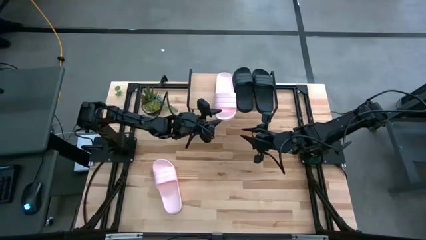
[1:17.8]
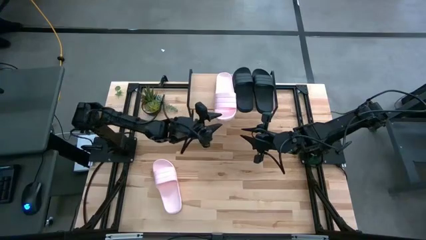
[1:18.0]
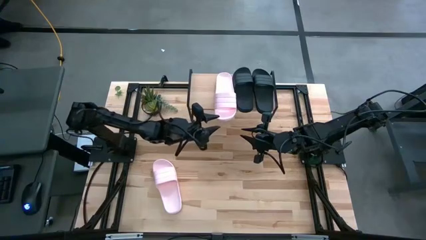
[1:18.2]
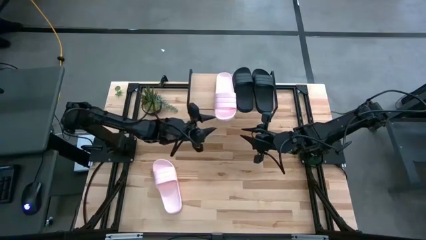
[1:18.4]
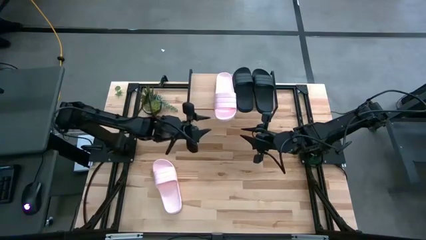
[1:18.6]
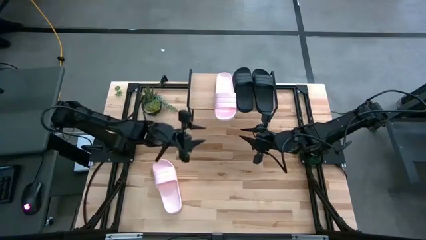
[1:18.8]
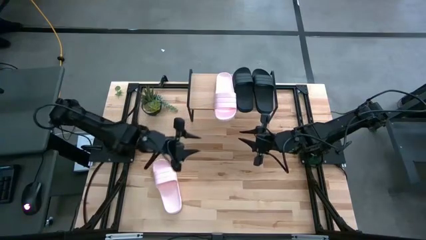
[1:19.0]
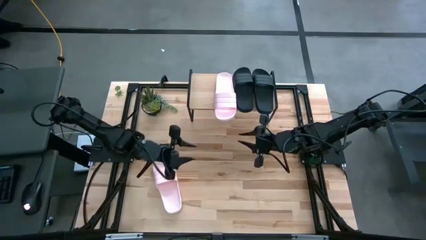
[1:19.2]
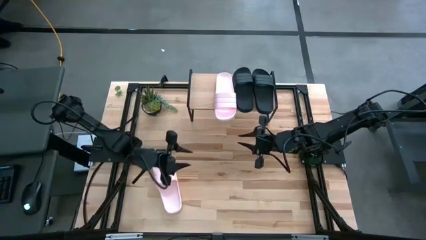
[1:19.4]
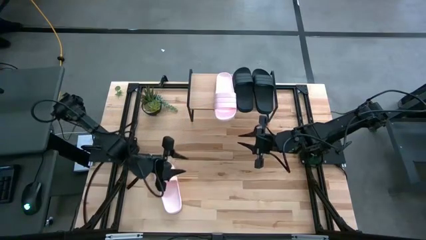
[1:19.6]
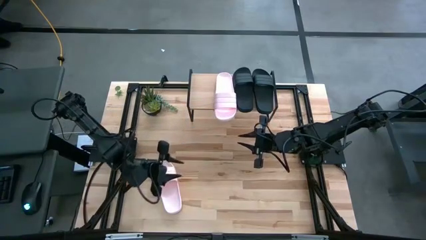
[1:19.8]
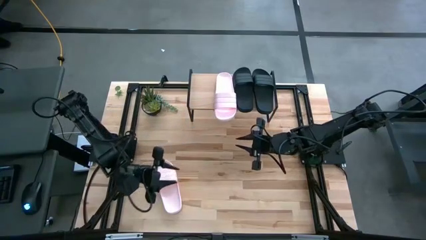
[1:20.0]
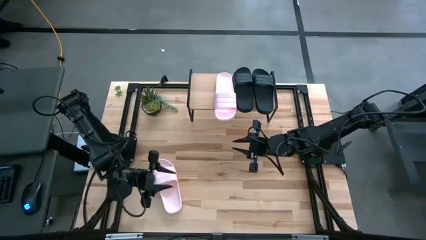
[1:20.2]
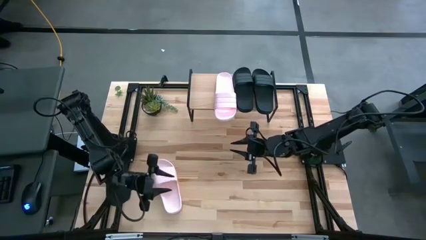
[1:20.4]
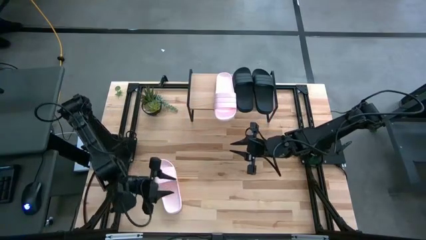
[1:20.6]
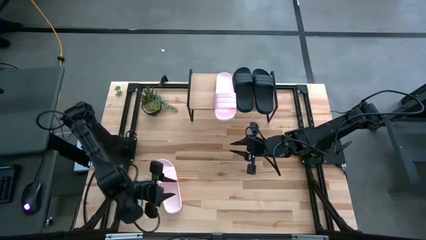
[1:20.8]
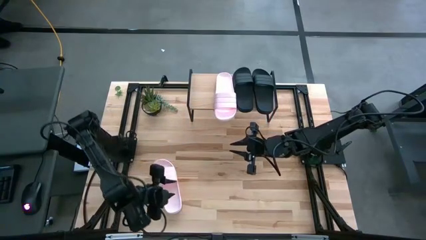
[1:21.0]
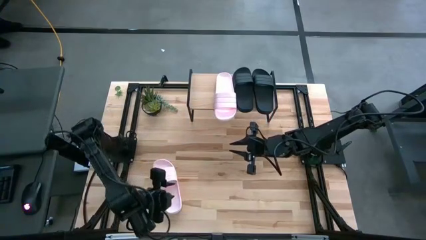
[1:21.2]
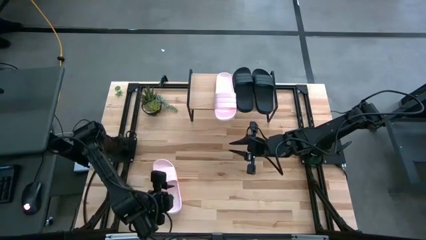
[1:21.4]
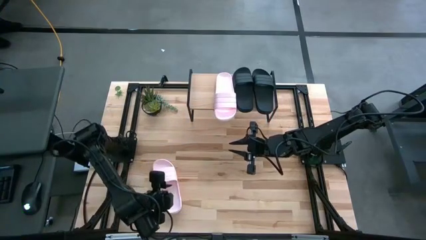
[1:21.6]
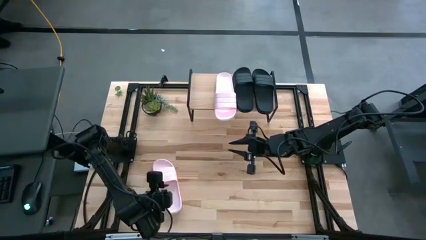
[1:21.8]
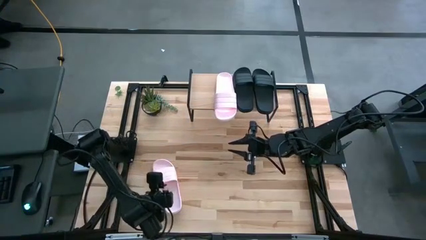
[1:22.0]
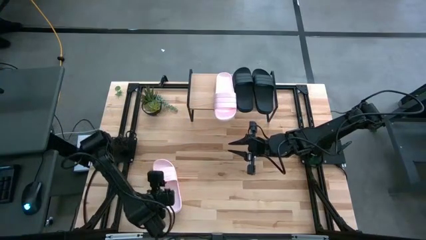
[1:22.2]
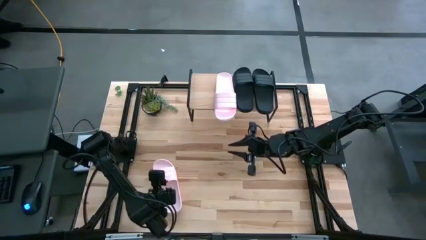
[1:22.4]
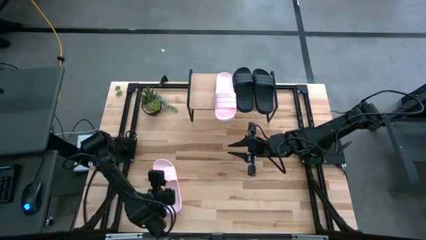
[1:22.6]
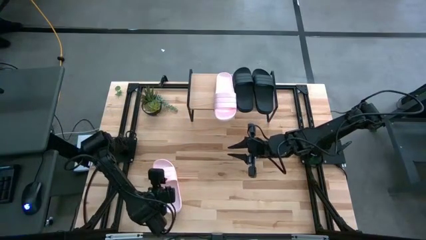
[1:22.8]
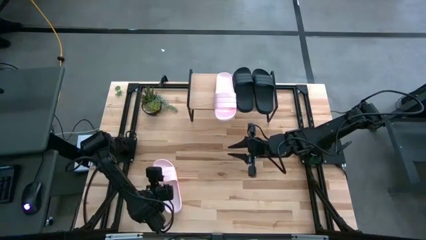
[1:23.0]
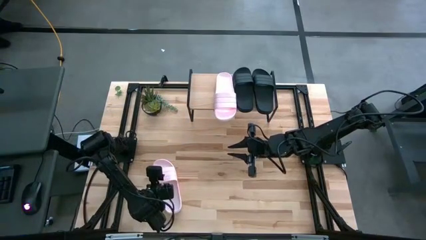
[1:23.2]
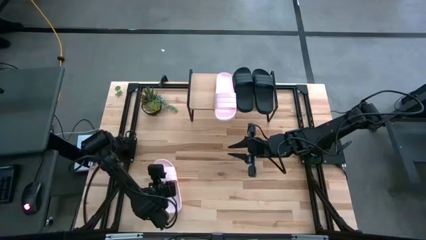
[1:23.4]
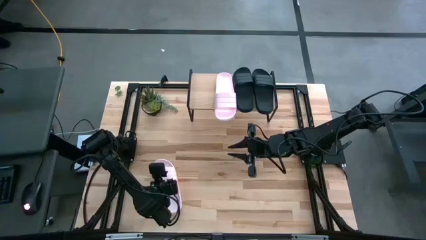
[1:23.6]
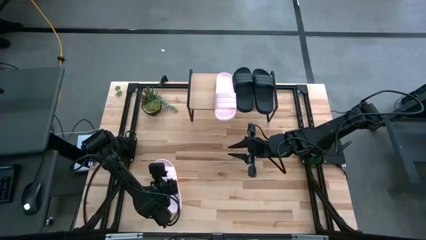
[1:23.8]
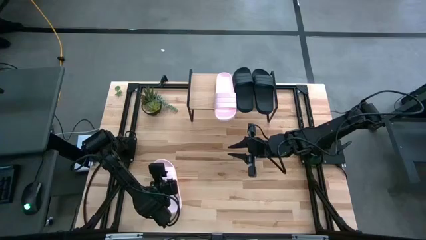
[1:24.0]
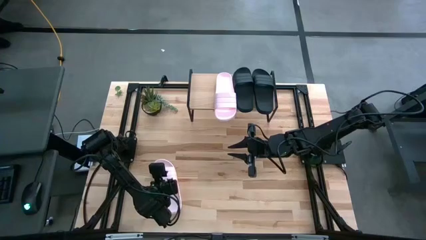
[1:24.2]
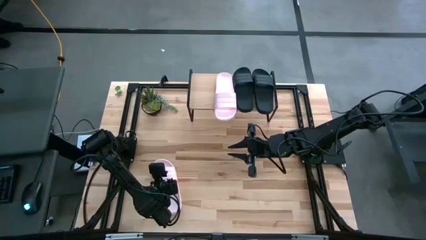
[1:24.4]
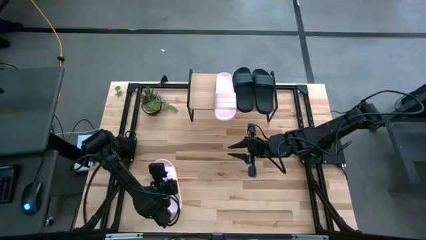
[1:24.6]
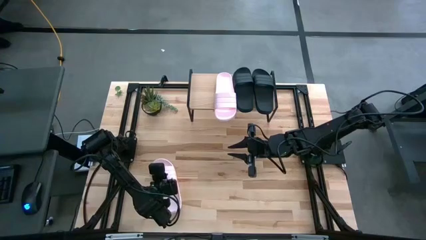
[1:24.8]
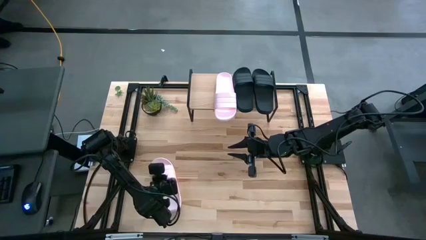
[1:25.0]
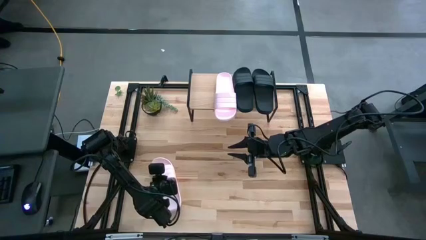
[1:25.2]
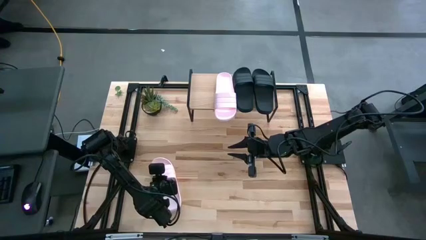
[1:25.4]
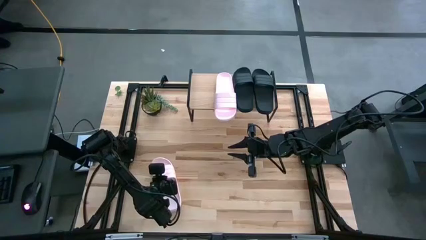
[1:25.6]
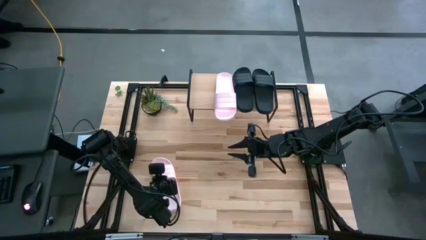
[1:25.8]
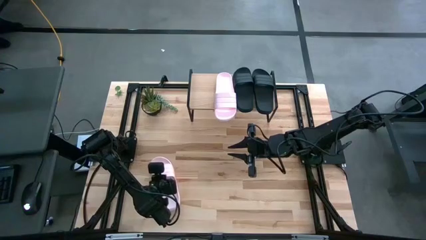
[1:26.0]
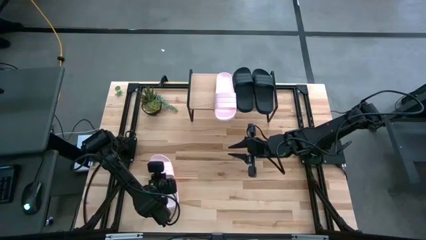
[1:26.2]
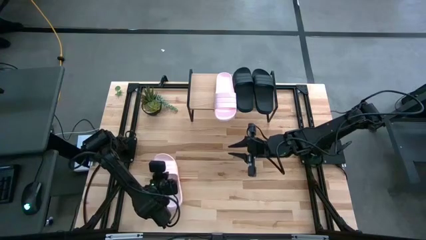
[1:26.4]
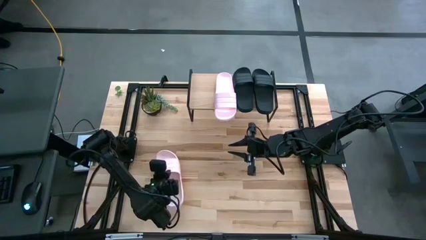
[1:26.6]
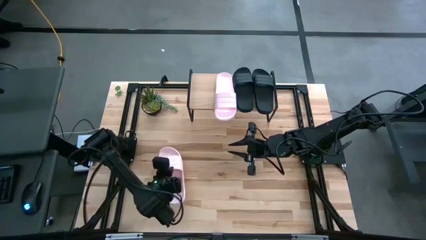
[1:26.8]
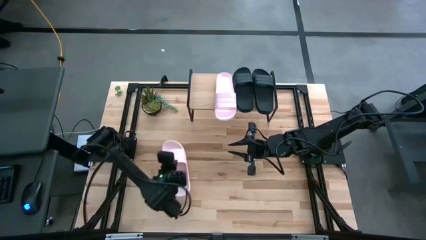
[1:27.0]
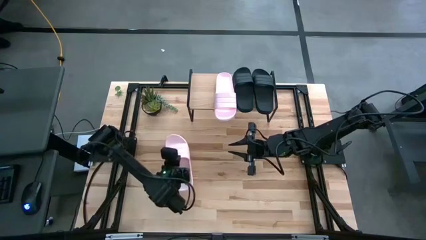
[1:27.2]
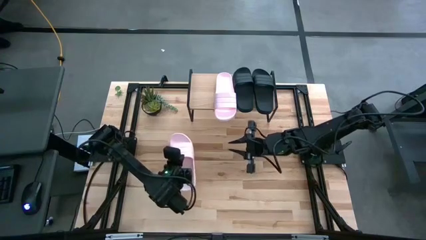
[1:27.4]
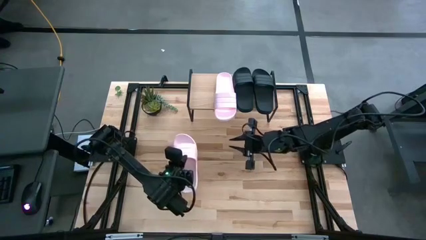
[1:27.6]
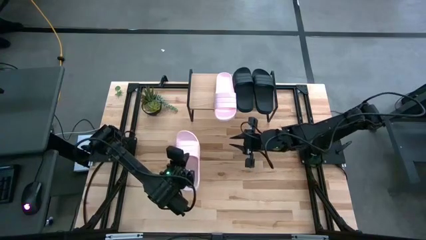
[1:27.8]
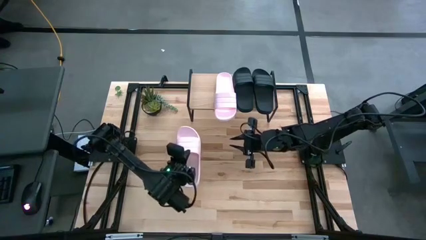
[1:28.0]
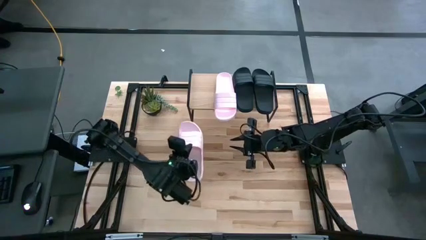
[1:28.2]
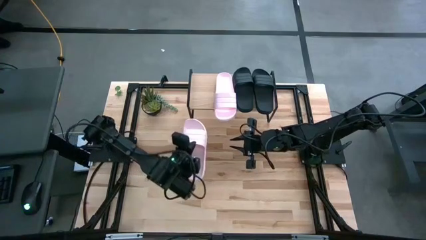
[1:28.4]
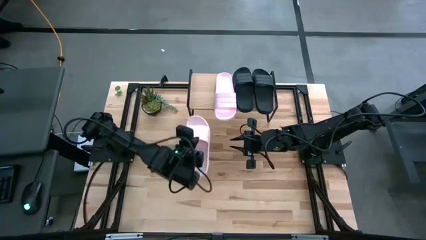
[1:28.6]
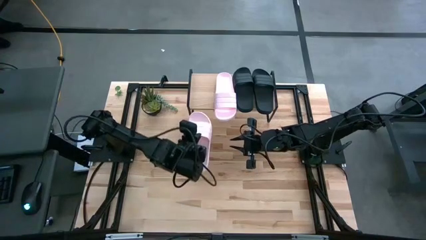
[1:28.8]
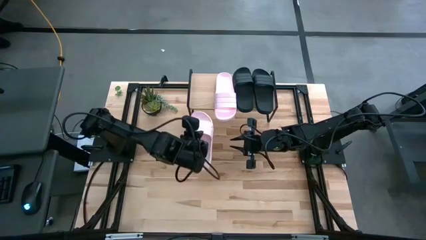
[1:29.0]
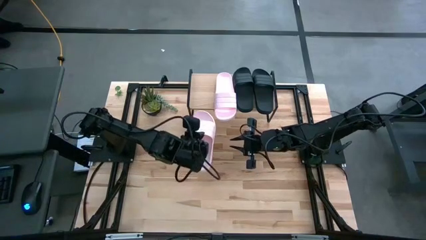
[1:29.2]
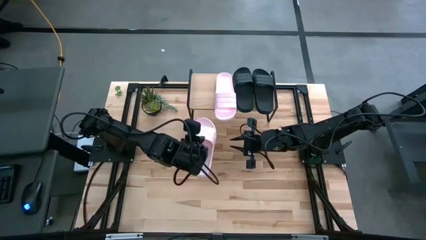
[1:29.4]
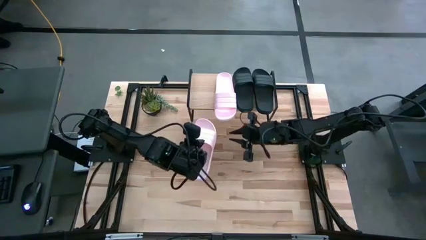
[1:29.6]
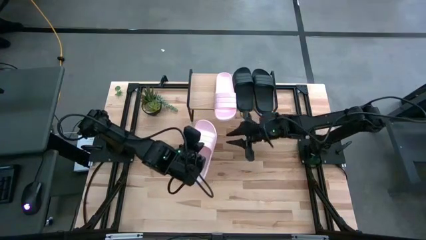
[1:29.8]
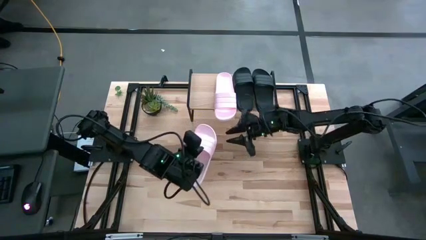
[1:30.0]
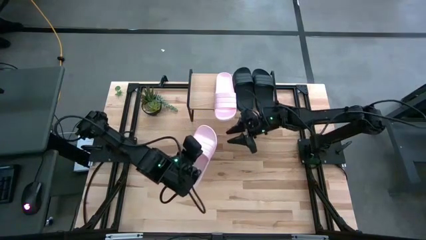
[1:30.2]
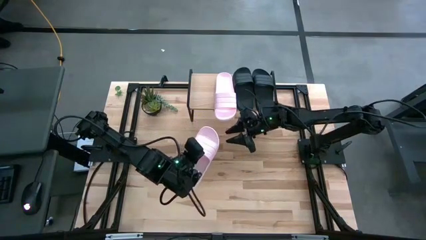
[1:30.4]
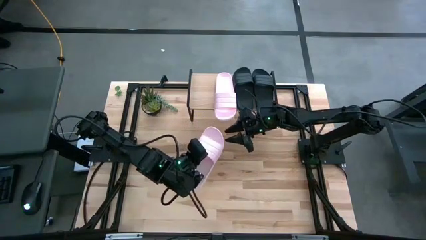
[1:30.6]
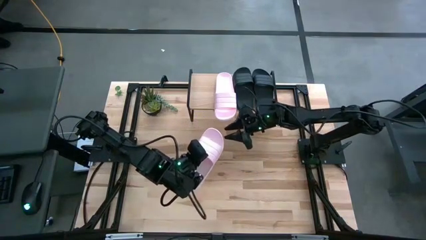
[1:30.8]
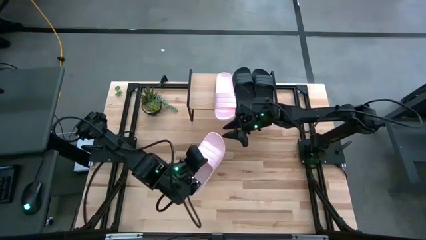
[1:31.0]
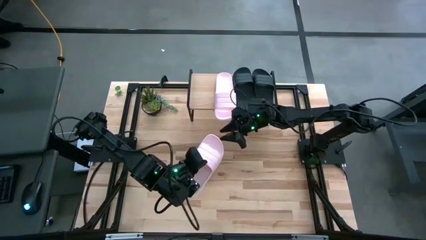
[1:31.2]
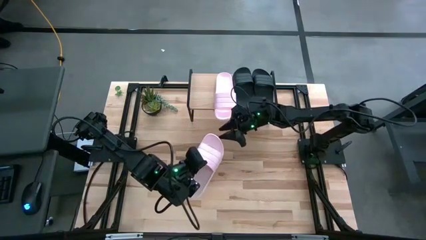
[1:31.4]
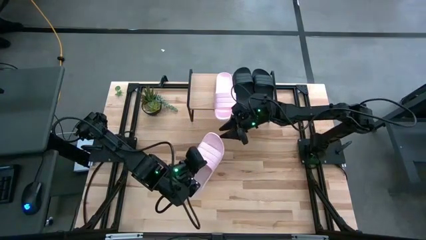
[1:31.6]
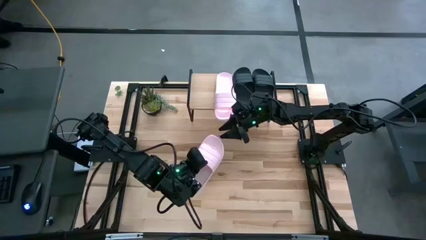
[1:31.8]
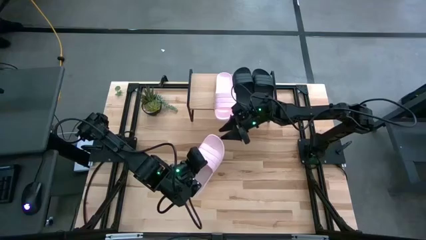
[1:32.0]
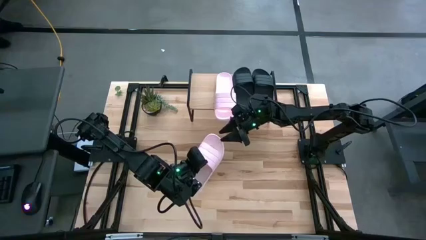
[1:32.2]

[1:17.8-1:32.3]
Task: Pick and place slides into the shelf
Put the pink slipper on the shelf

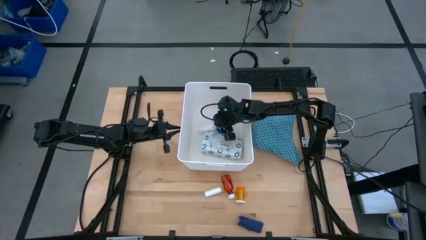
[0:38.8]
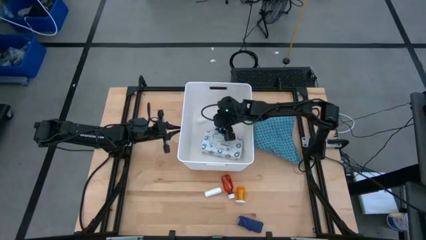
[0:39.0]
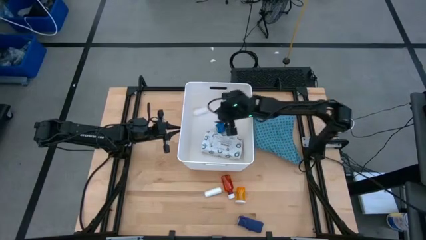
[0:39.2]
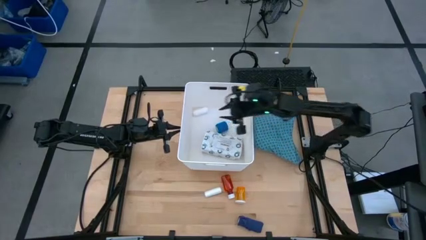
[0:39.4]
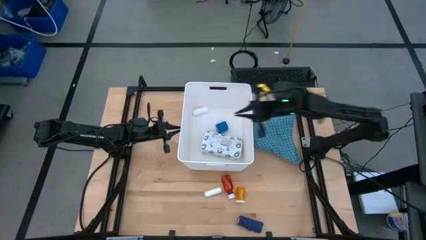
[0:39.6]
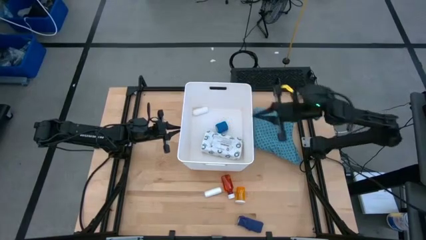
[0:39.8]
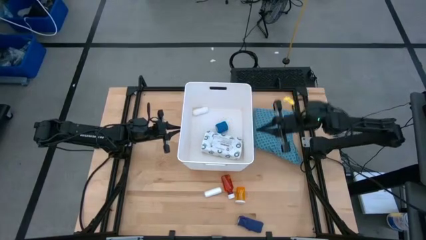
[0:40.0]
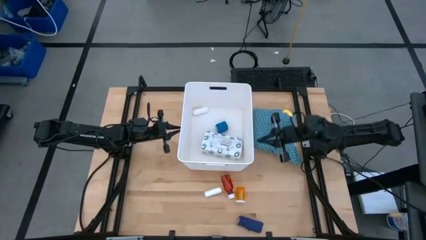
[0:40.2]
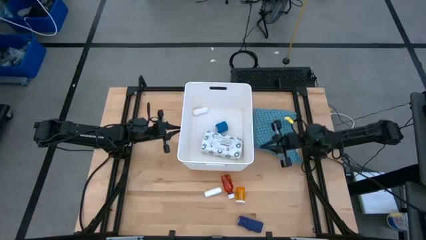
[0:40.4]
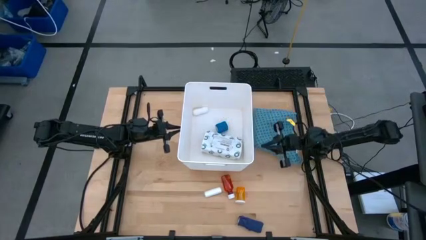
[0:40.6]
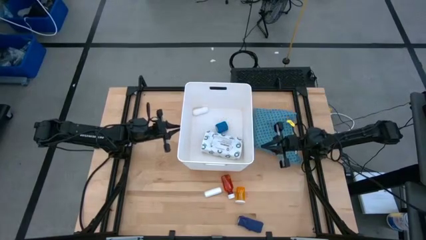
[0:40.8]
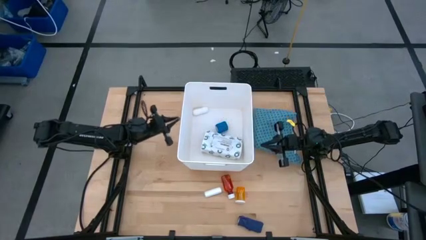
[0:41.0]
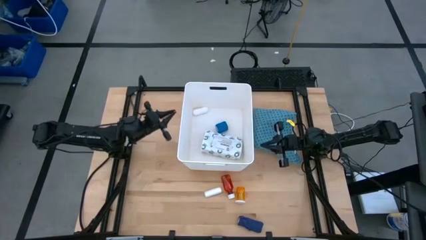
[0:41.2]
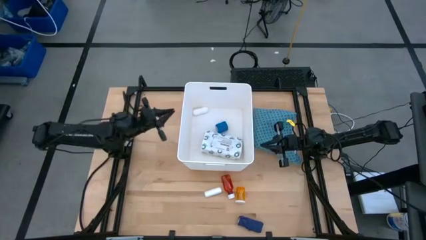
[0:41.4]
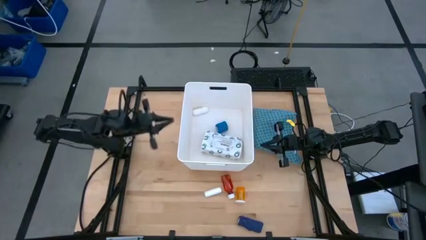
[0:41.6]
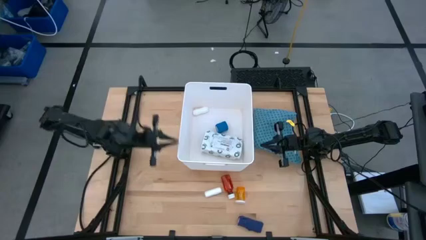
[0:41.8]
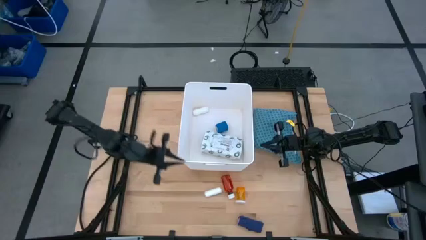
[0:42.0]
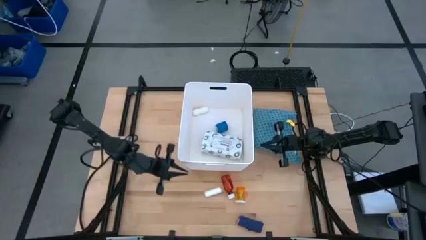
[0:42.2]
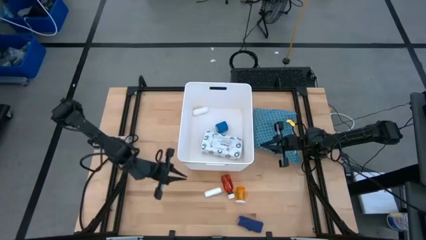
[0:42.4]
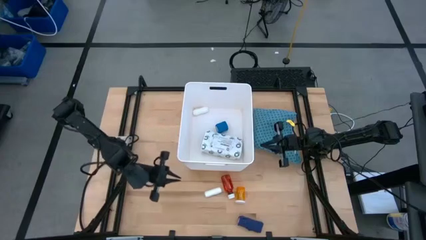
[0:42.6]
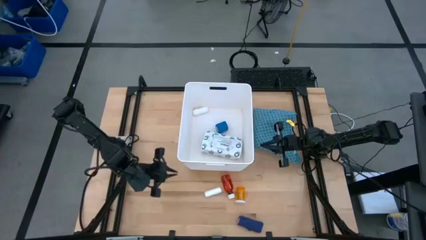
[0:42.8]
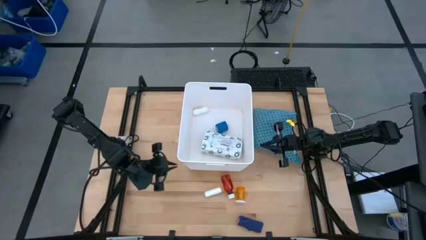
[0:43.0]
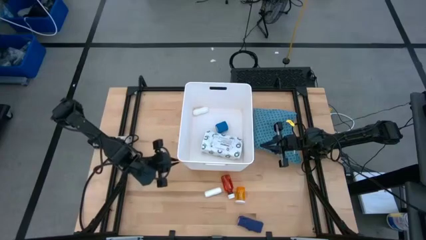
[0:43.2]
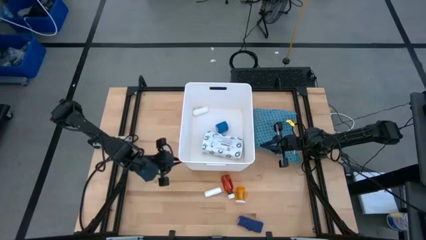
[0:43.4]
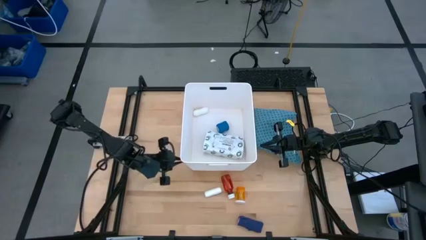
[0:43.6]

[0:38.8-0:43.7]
Task: Pick & place medical supplies in basket/bin
Adjust the white bin
